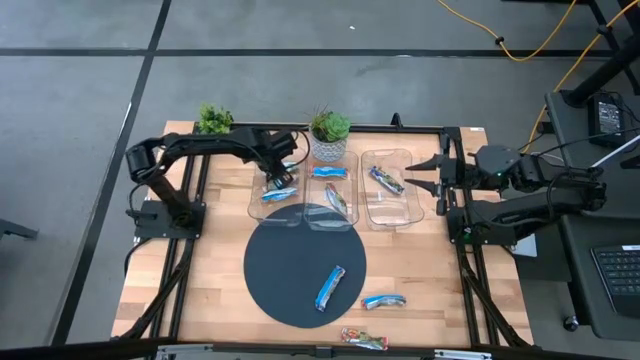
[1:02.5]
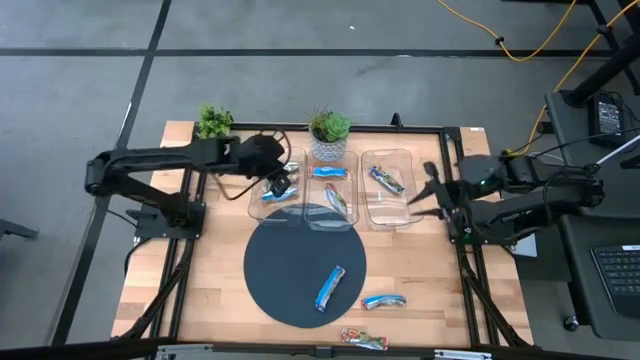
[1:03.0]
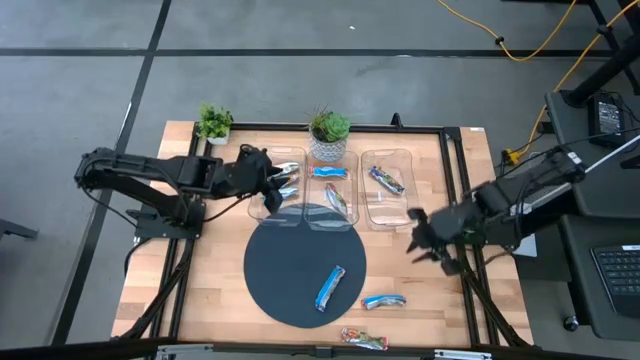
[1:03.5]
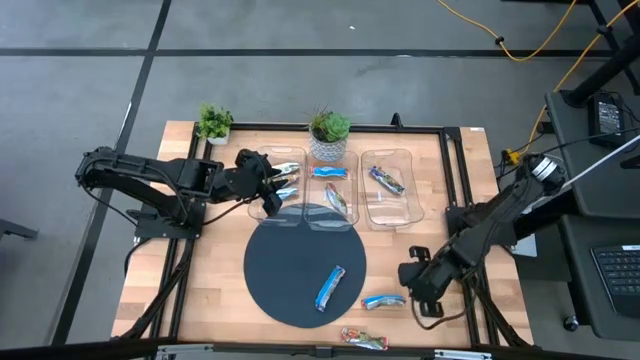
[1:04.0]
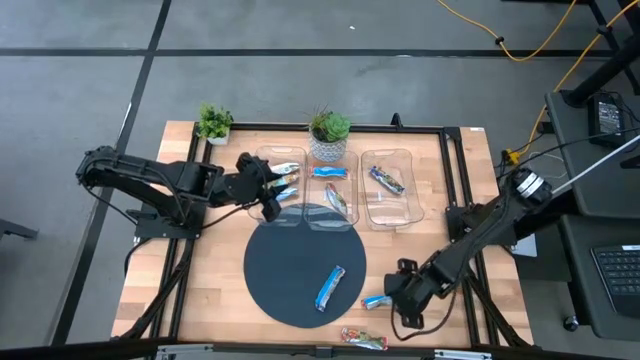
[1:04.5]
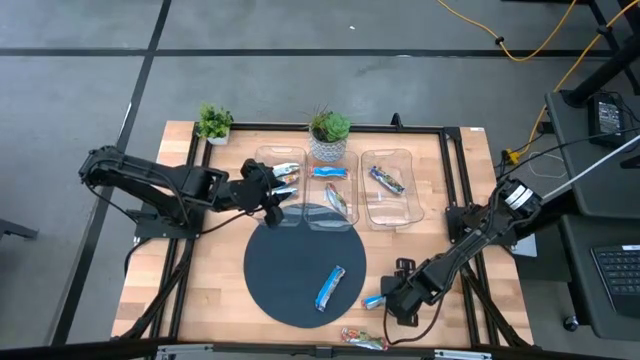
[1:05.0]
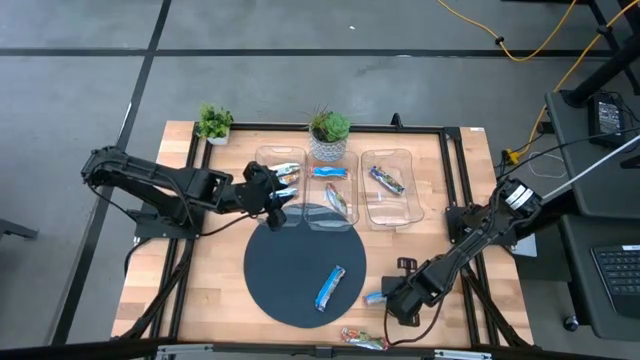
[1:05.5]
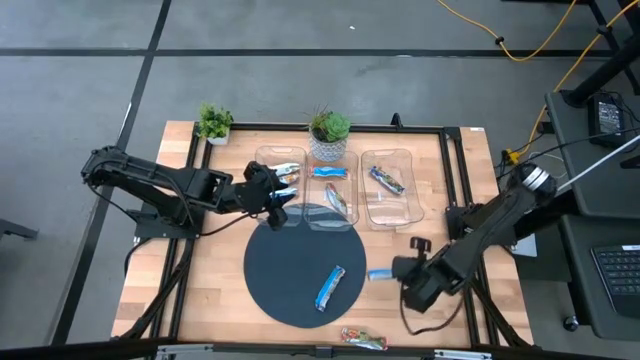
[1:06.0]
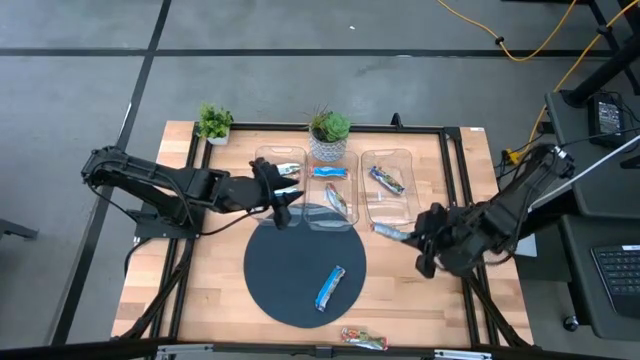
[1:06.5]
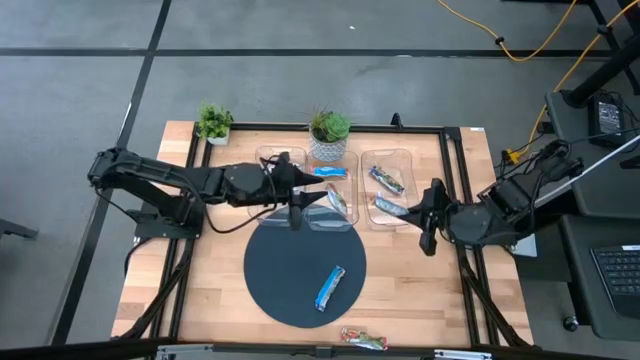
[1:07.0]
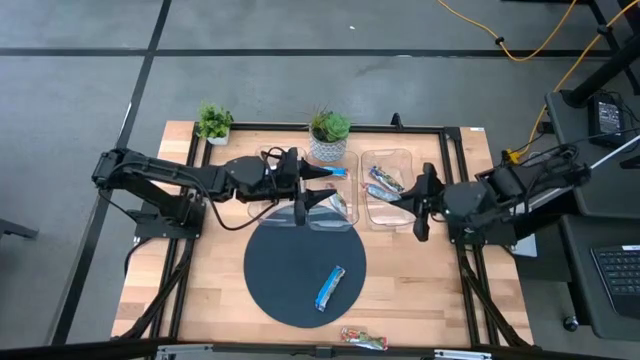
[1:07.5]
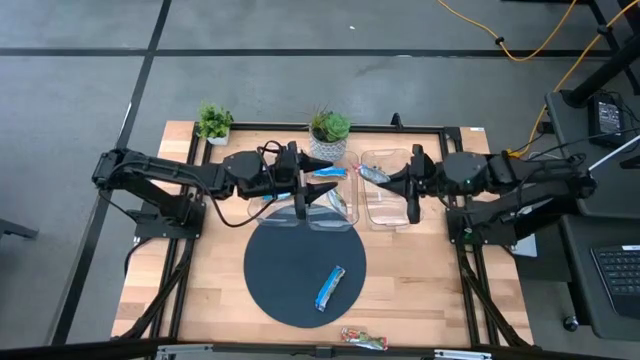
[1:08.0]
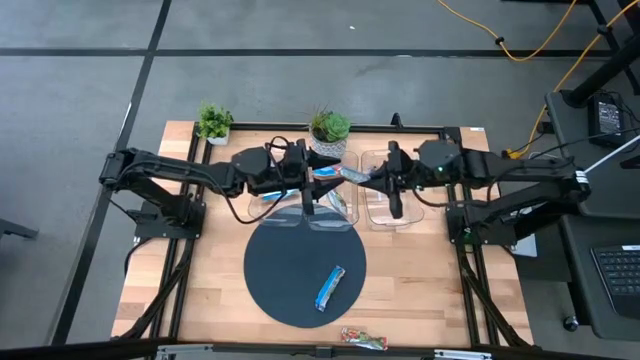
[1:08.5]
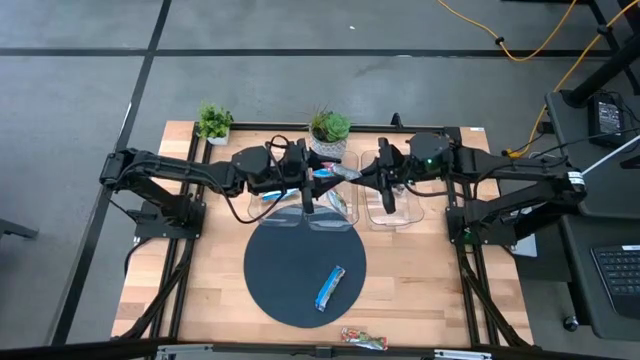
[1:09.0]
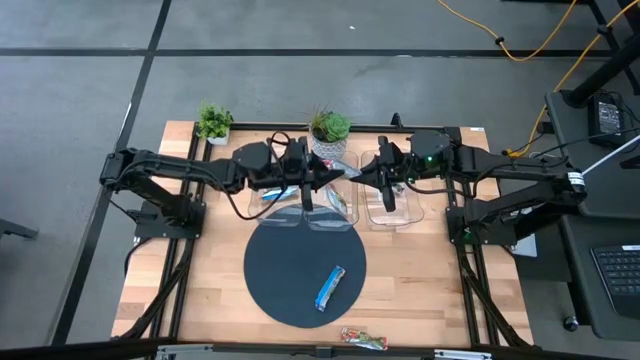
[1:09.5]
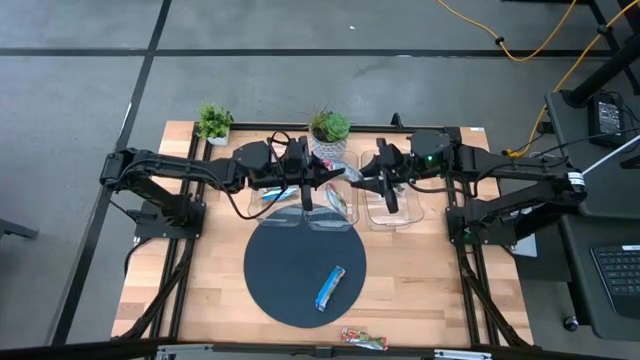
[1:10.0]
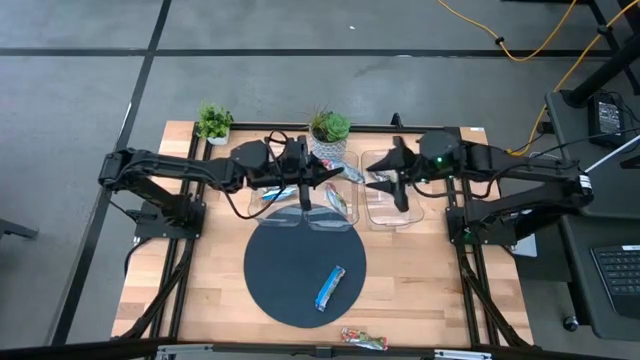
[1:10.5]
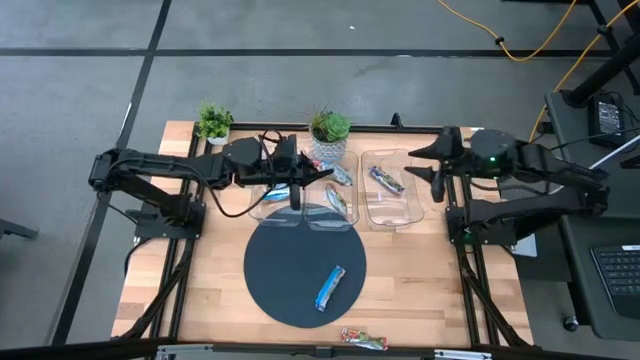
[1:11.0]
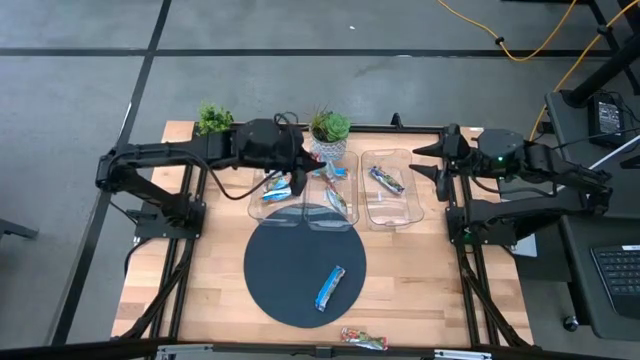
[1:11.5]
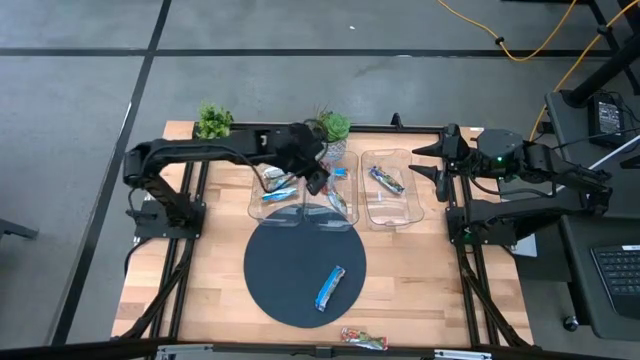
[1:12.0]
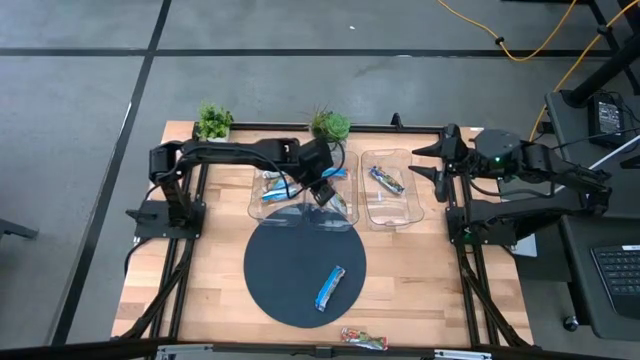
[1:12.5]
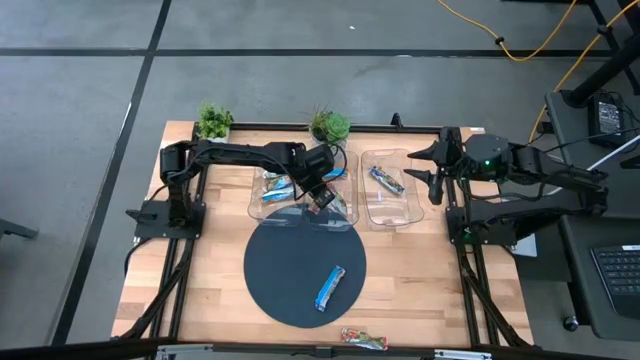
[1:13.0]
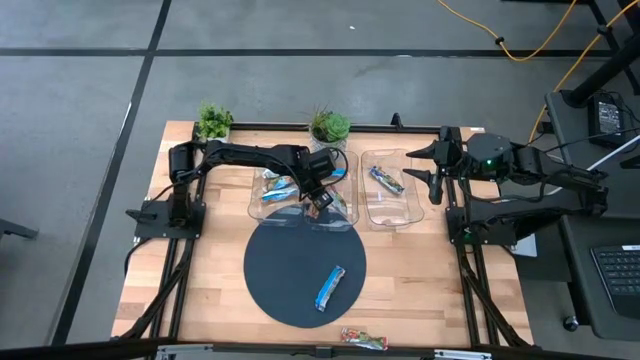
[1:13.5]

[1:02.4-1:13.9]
Task: Pick and place Granola Bars by type
Put the red granola bar into the middle transparent bin

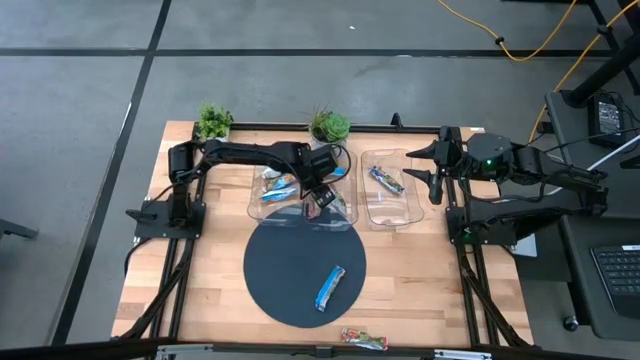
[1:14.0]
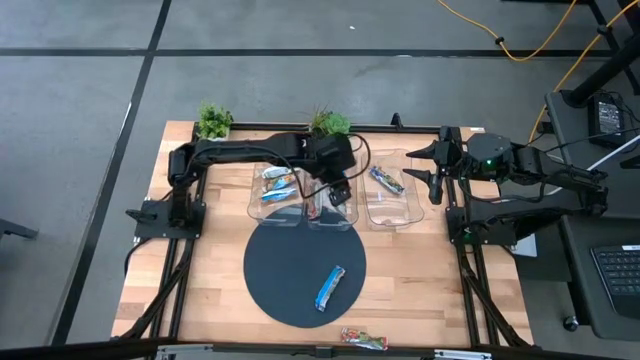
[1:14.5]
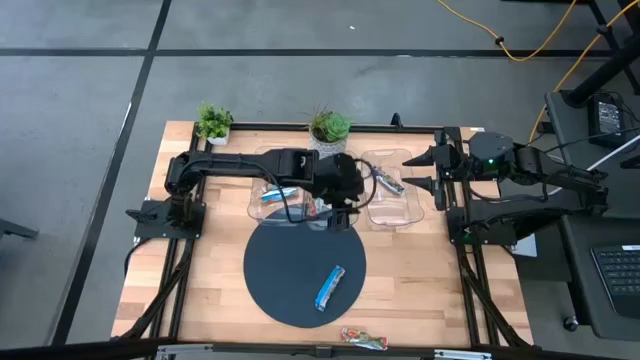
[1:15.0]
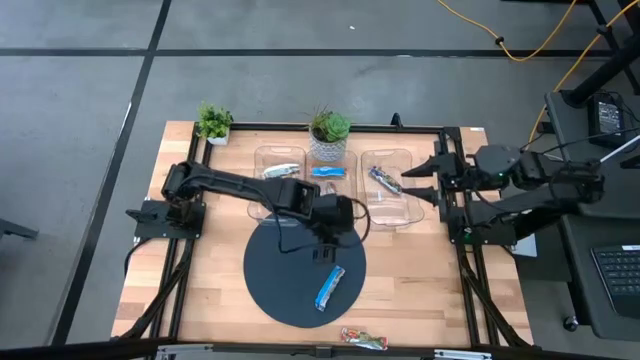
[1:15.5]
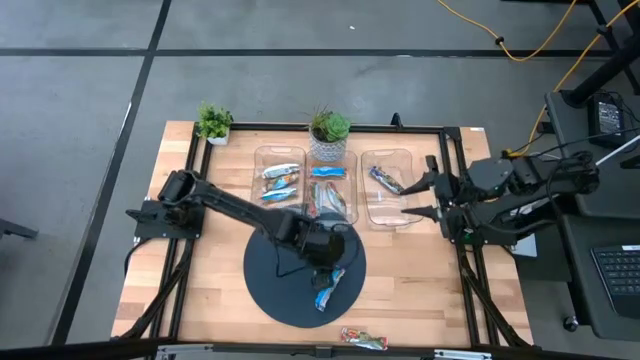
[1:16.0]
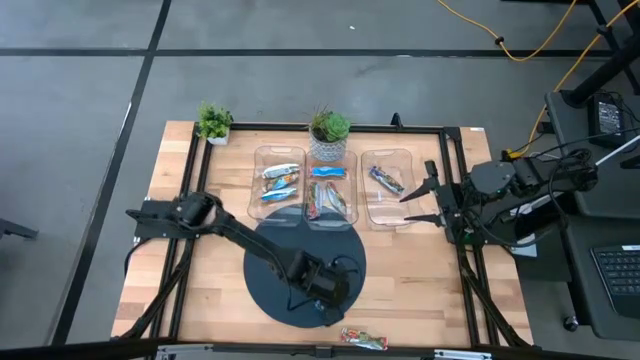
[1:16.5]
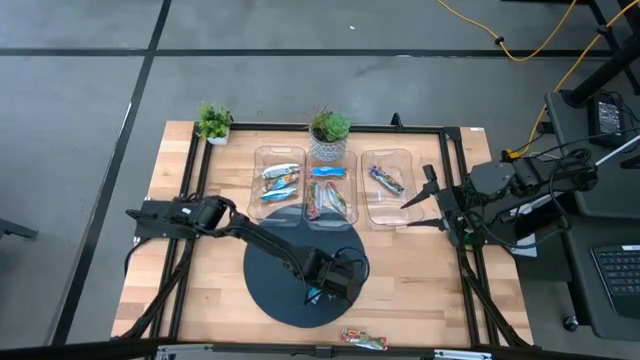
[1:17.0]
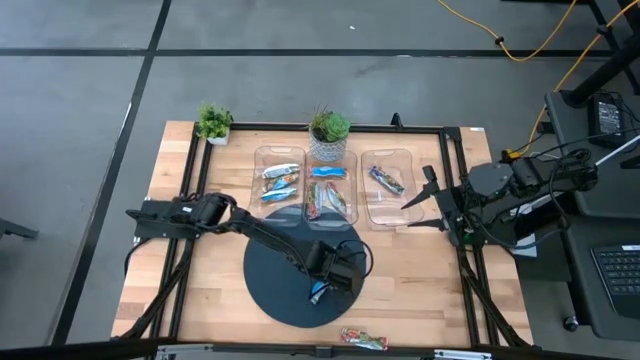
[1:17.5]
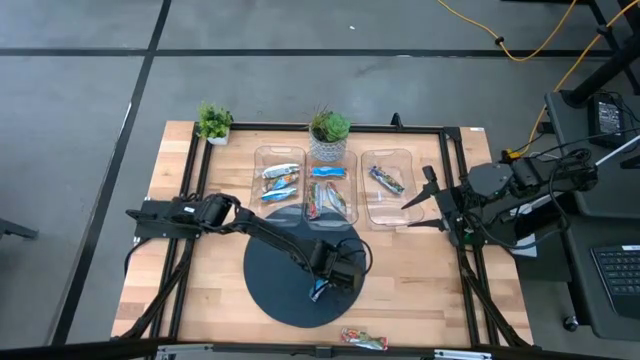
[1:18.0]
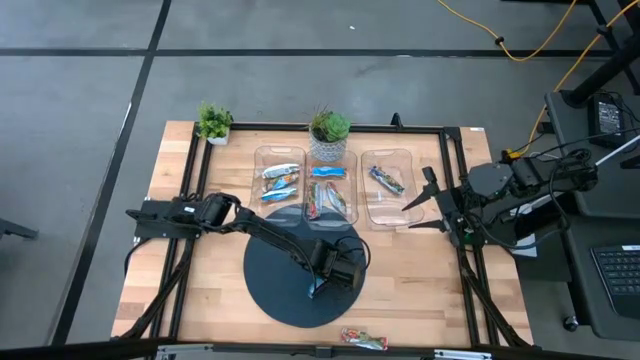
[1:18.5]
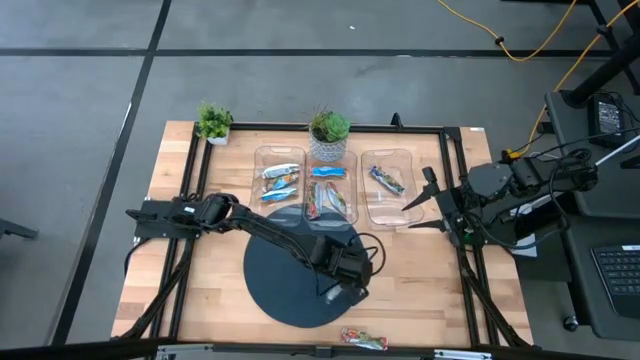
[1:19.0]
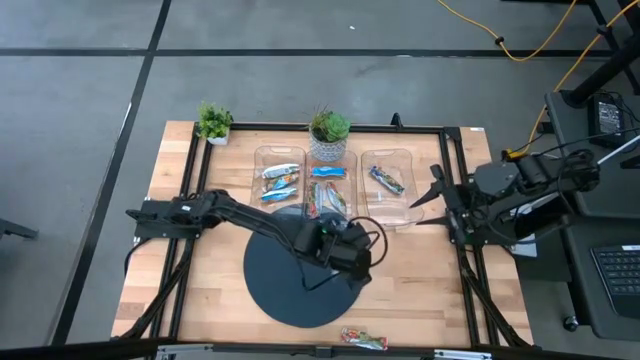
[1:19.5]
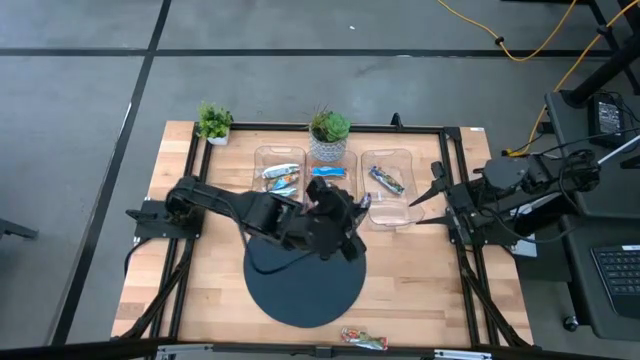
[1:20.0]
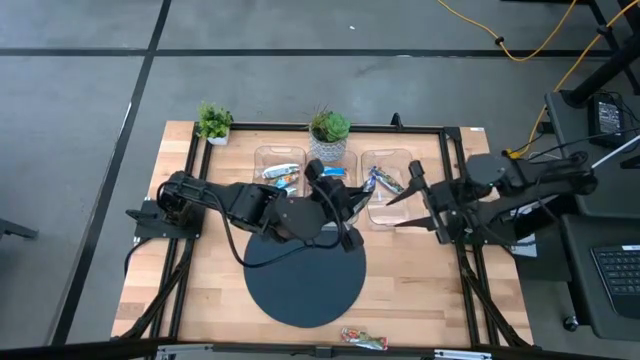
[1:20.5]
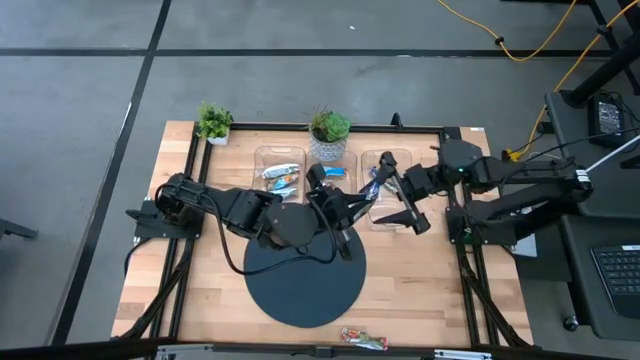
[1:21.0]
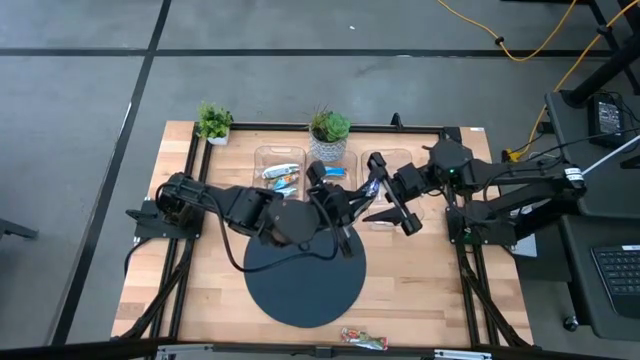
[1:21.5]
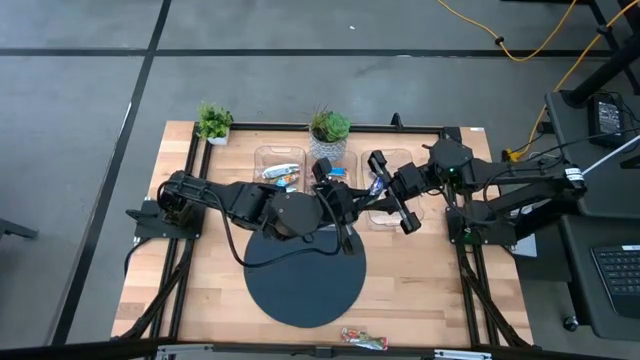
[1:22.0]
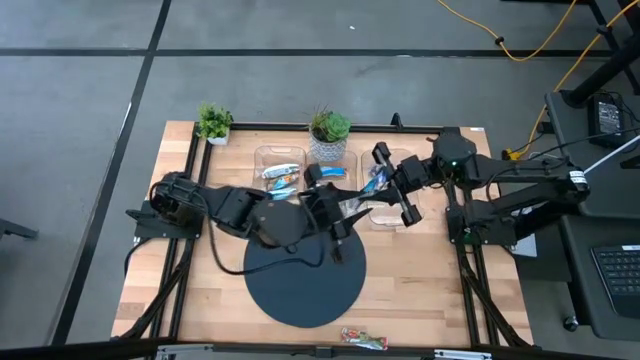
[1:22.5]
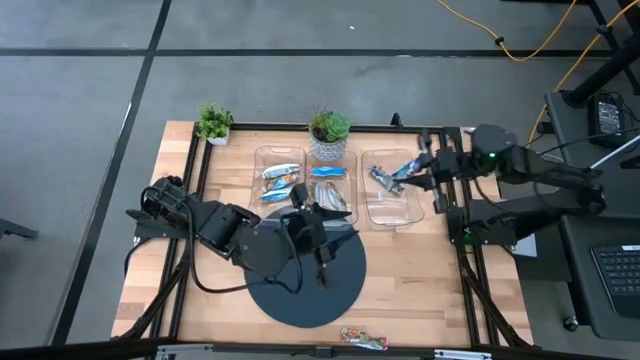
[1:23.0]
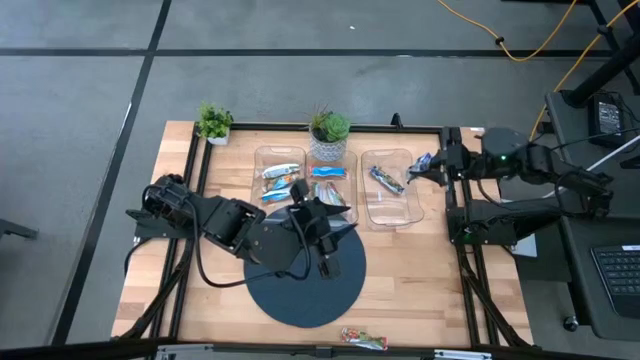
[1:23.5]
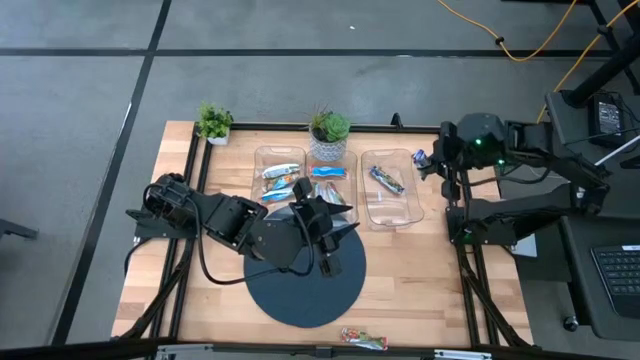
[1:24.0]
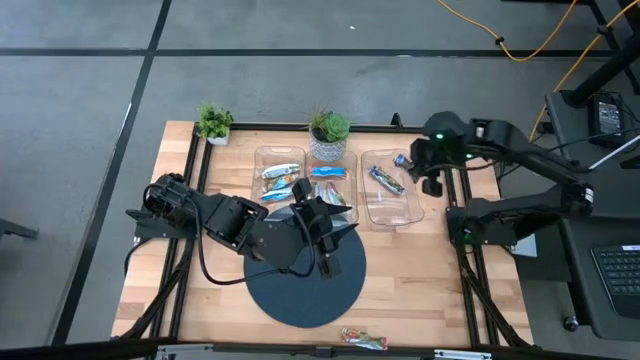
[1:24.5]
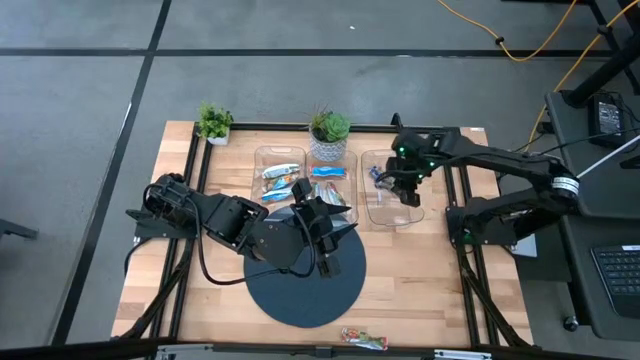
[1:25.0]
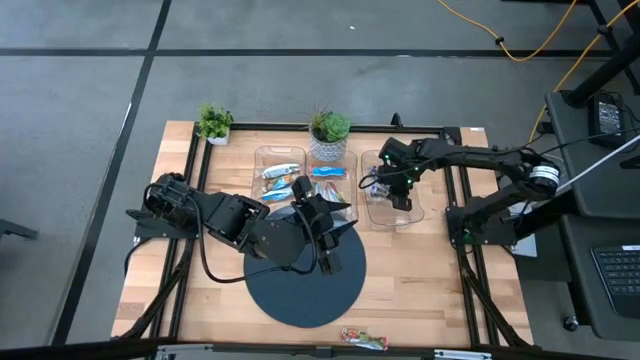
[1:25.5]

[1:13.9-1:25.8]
Put the blue granola bar into the right transparent bin
